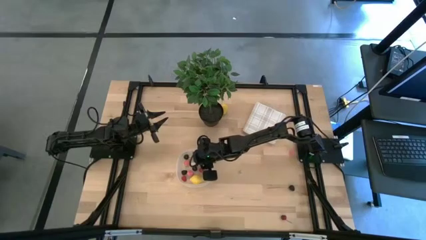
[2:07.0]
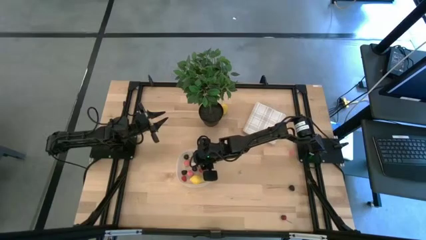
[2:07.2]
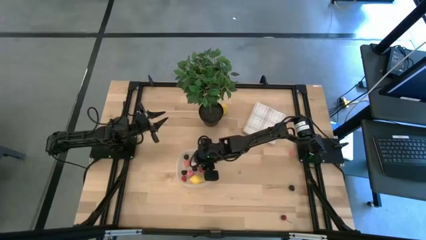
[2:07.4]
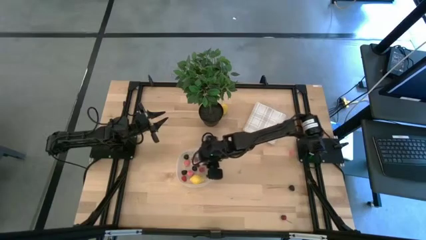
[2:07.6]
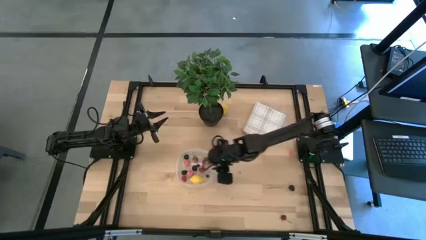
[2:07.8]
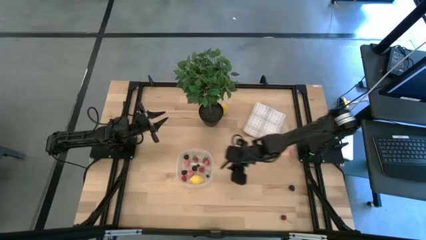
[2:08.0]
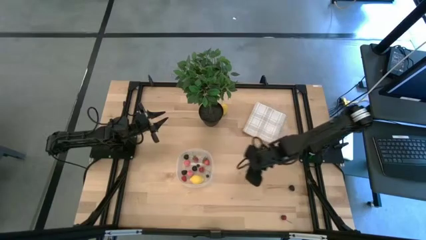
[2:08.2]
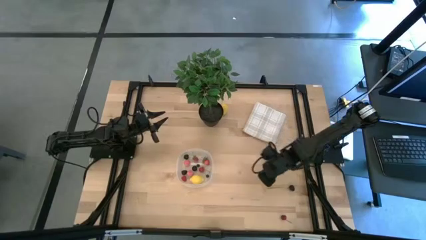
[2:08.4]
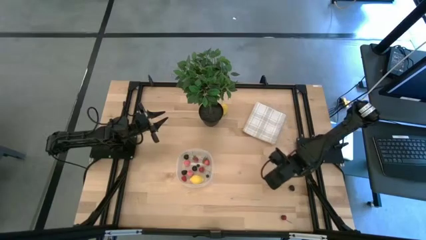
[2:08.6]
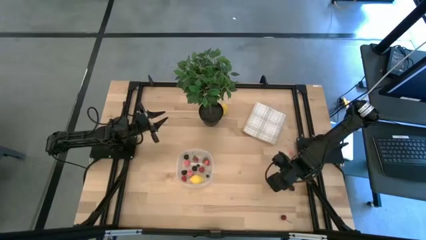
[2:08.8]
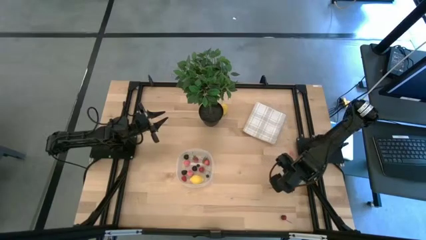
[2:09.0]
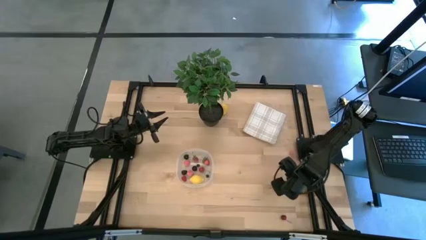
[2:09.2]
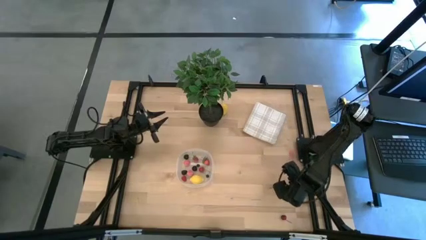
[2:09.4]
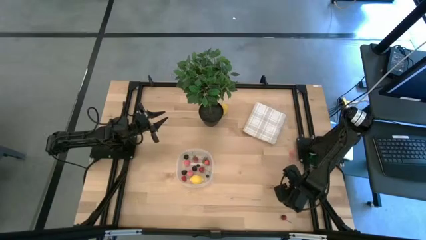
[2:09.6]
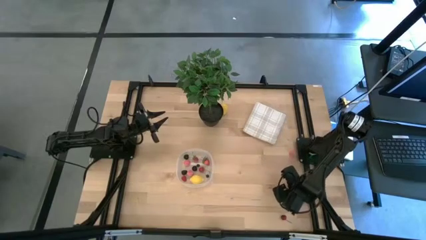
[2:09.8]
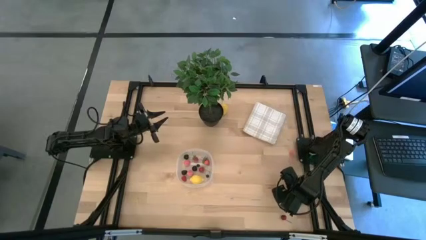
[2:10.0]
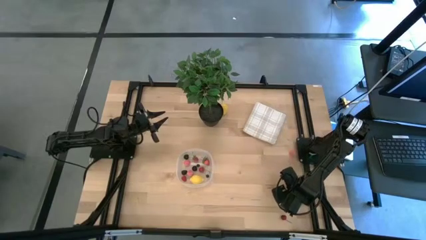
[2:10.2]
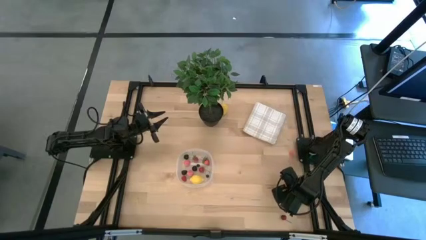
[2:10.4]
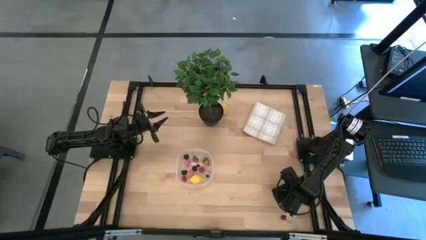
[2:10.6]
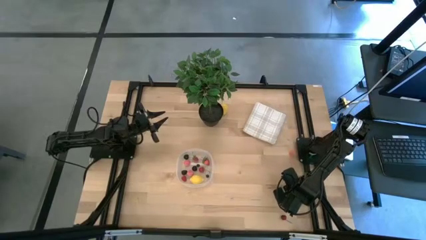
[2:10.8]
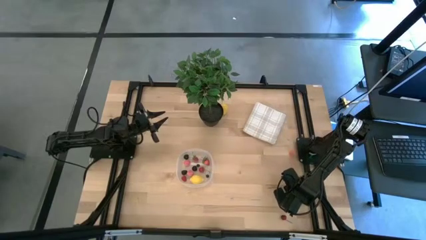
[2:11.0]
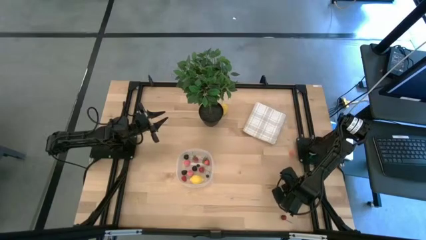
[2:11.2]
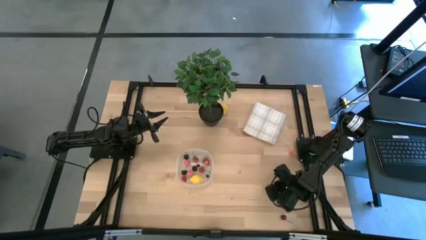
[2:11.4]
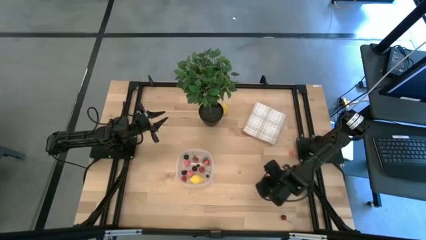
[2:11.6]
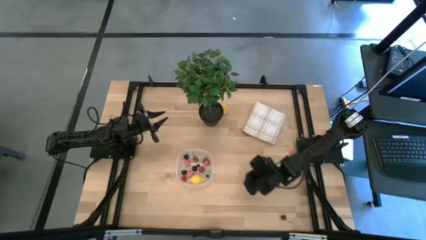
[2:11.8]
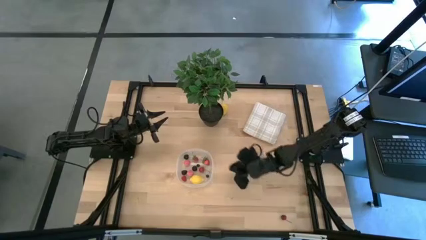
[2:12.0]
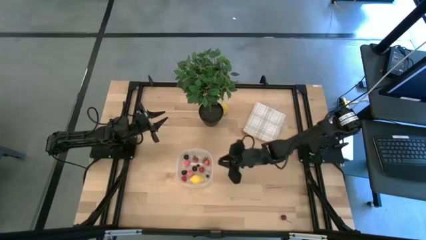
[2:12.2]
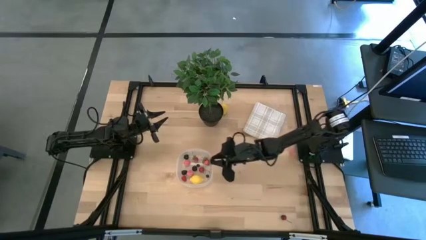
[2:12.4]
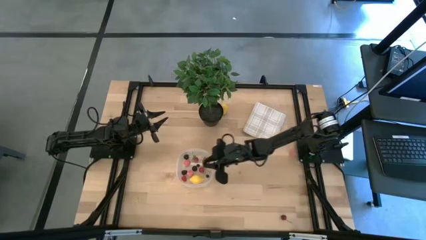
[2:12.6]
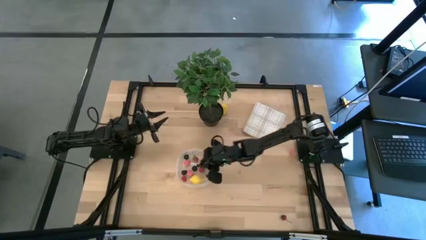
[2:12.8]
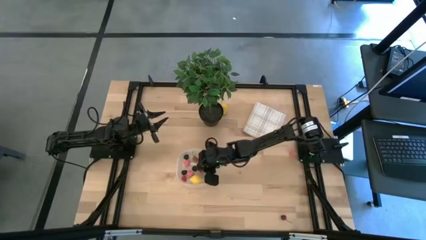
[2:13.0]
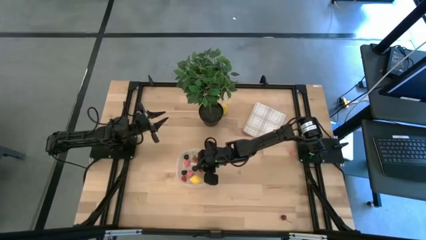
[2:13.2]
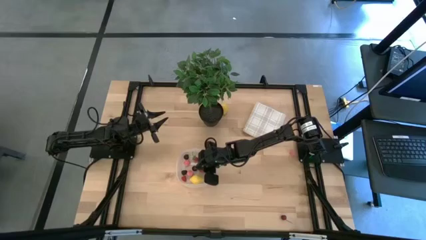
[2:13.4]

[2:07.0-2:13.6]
Task: Pick and placing Produce into tupperware
Put the blackberry into the transparent bin

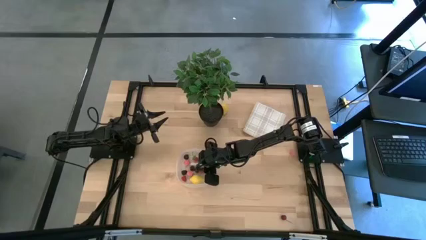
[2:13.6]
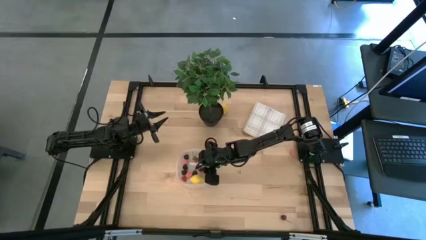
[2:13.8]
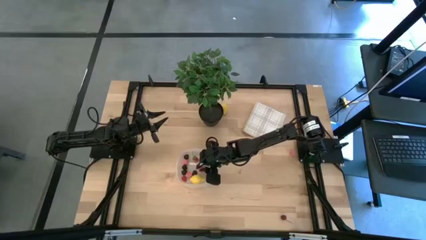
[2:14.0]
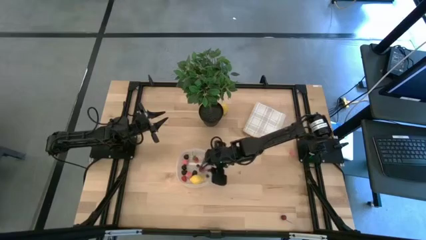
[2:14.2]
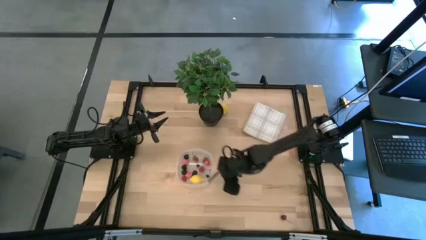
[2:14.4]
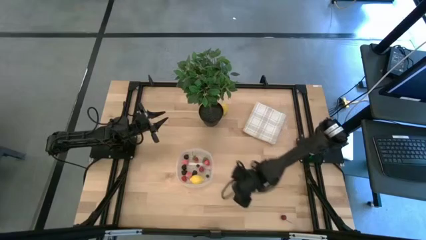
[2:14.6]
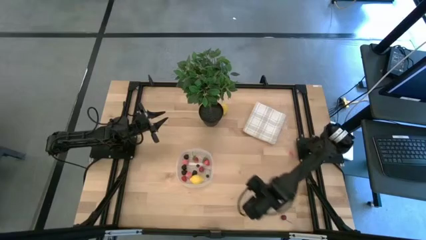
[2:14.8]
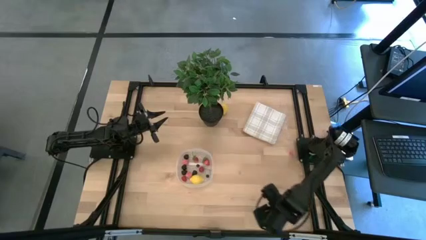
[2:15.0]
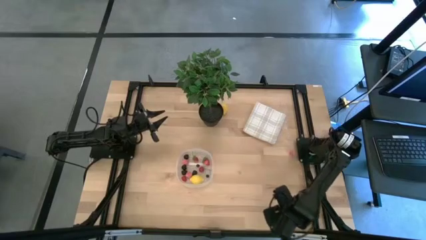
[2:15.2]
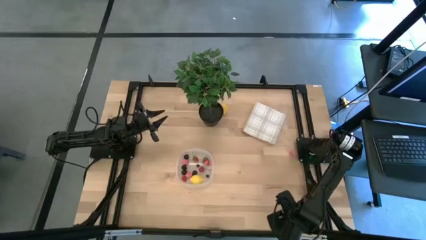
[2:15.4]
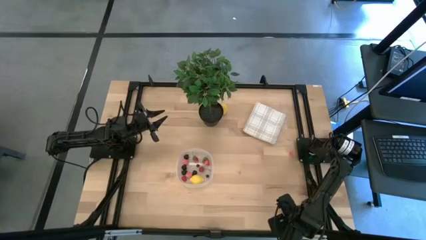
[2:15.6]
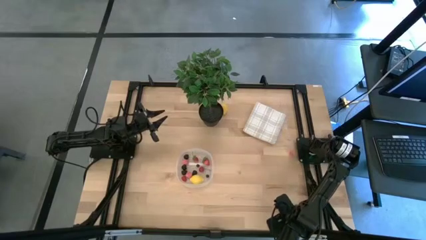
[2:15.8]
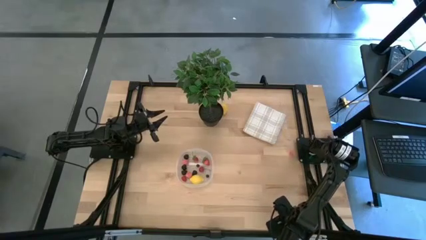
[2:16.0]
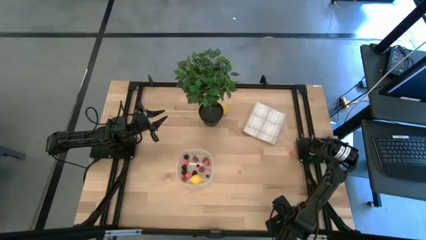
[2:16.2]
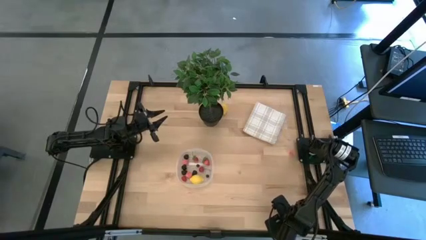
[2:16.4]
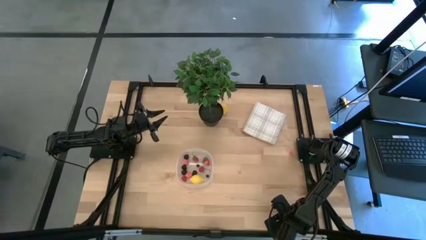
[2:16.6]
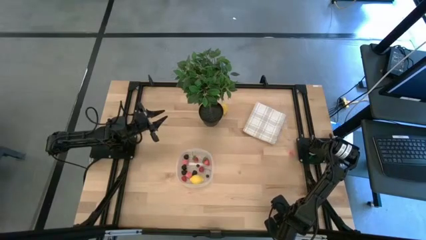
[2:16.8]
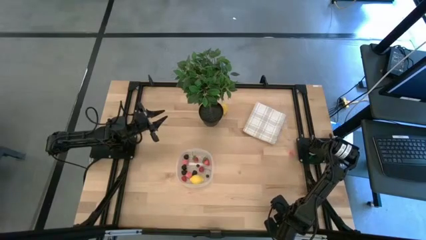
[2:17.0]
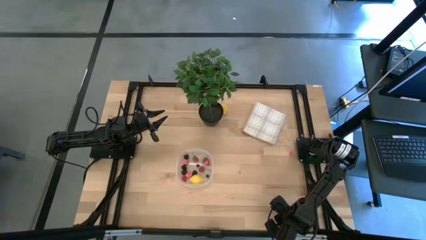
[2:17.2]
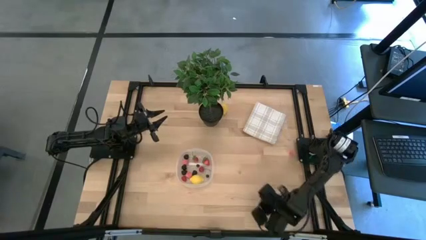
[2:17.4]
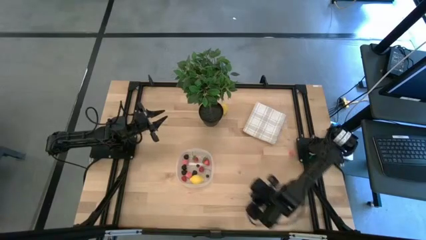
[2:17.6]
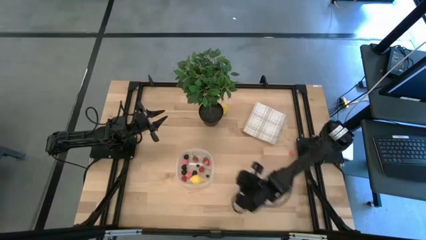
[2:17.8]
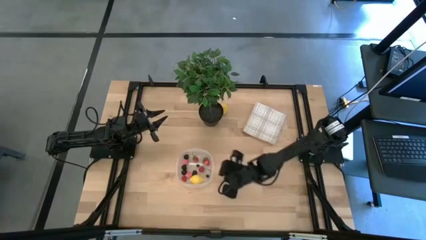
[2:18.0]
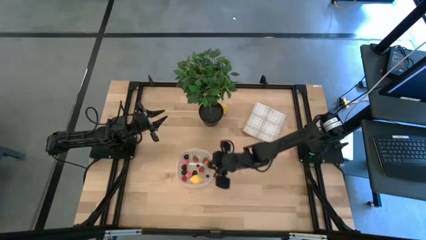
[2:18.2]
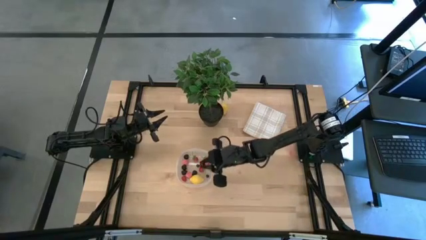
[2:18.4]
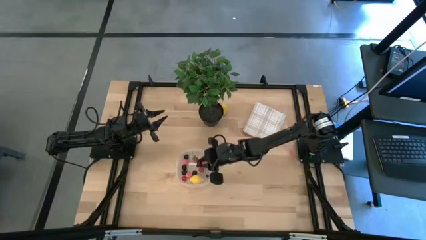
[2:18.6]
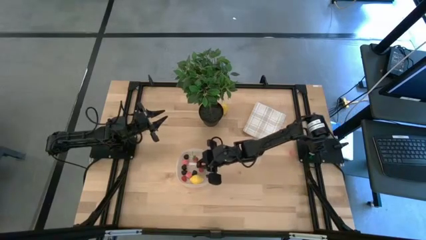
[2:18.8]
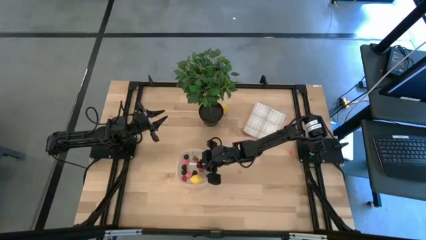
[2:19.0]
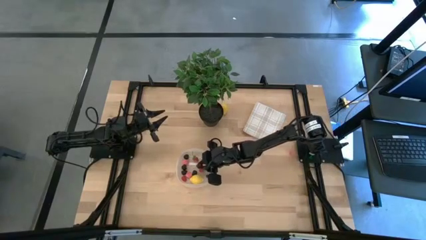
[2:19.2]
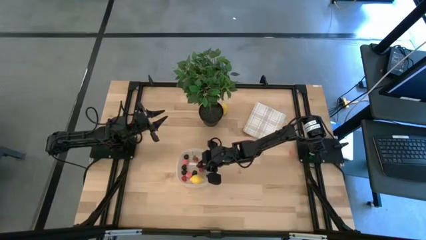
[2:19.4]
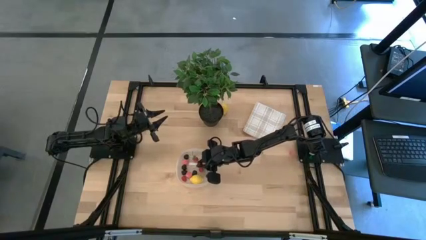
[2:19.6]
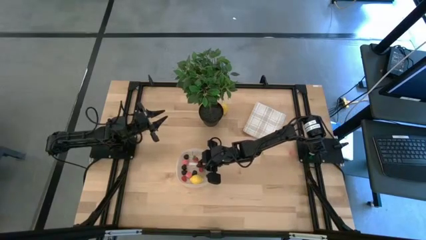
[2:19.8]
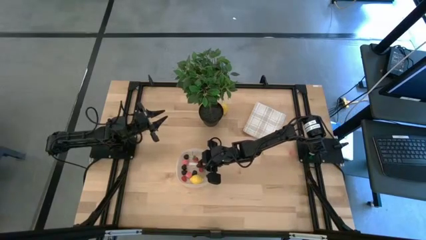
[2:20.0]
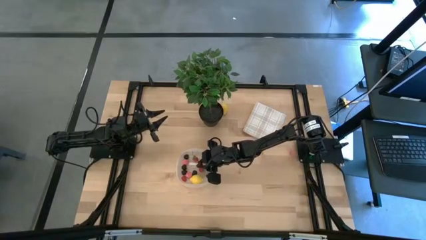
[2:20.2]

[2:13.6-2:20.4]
Put the red cherry into the transparent bin
